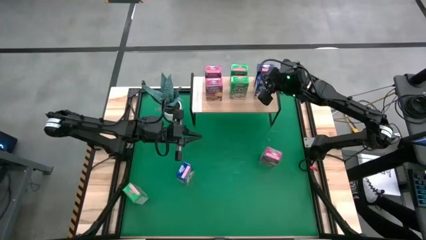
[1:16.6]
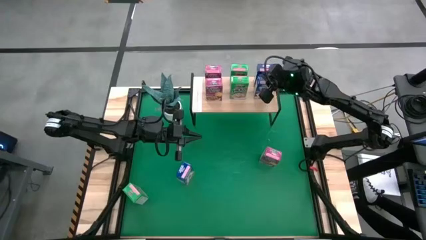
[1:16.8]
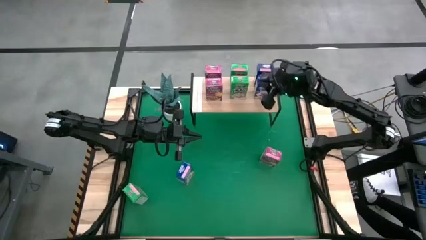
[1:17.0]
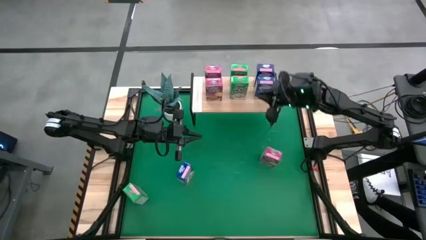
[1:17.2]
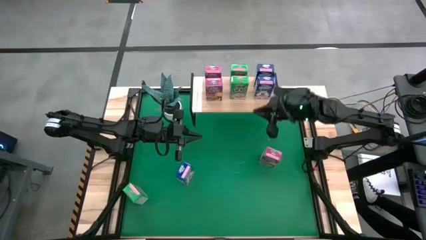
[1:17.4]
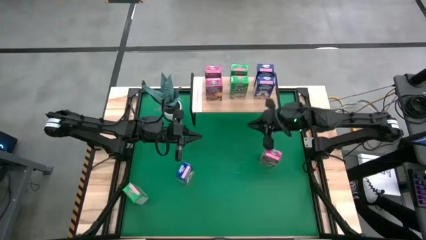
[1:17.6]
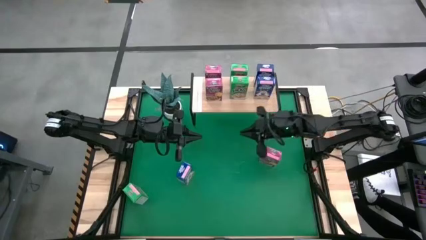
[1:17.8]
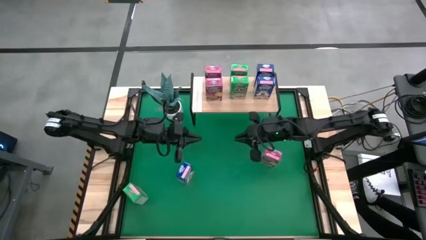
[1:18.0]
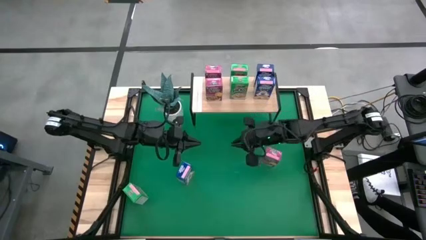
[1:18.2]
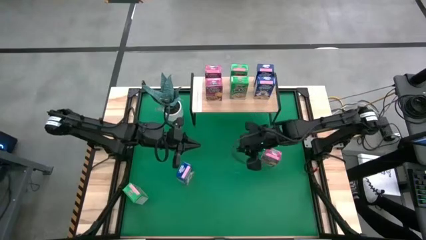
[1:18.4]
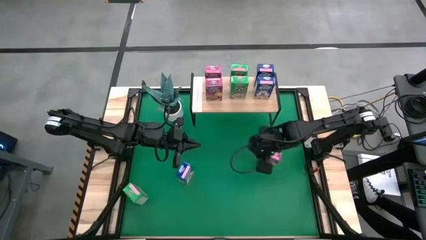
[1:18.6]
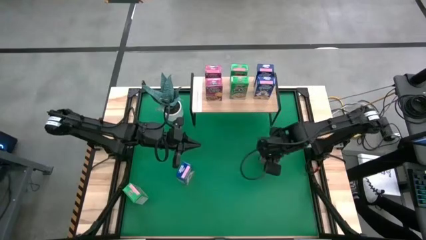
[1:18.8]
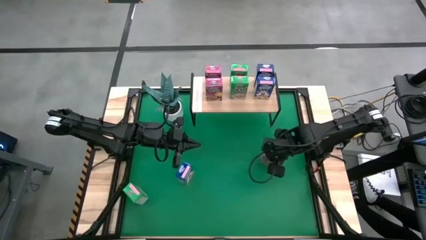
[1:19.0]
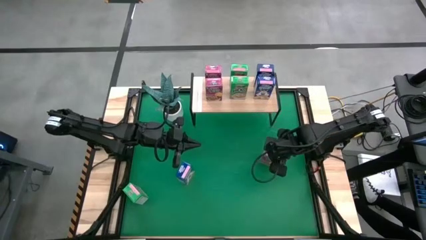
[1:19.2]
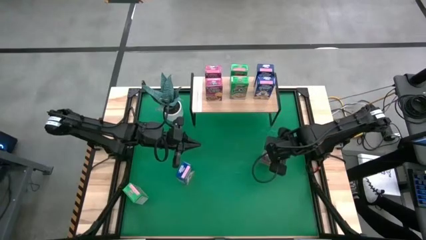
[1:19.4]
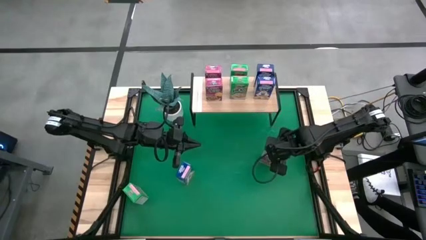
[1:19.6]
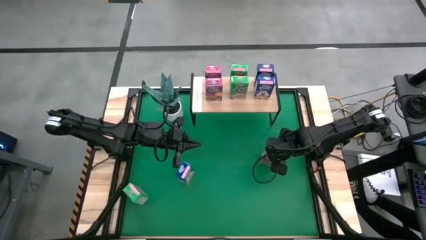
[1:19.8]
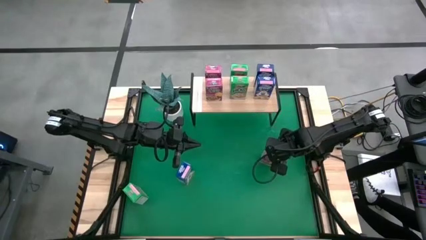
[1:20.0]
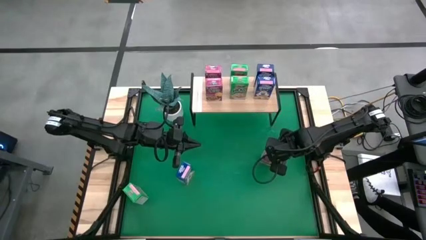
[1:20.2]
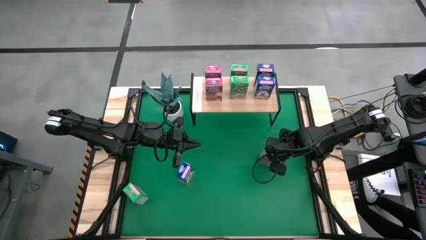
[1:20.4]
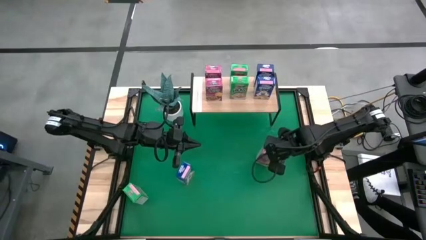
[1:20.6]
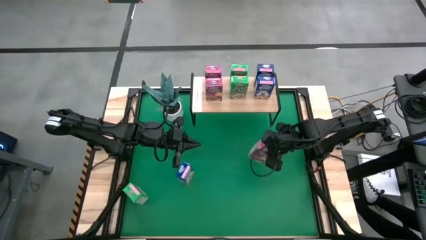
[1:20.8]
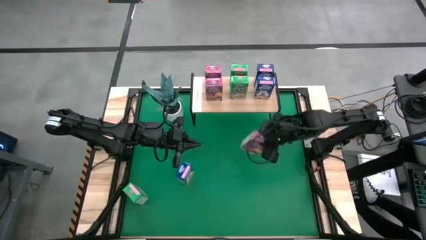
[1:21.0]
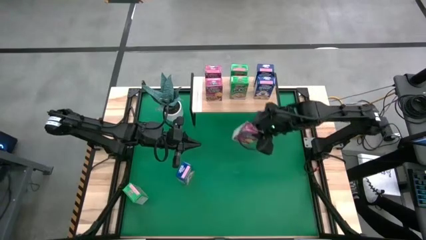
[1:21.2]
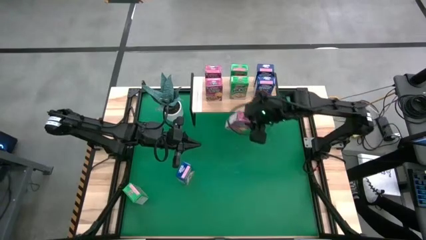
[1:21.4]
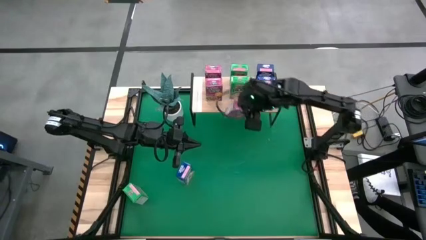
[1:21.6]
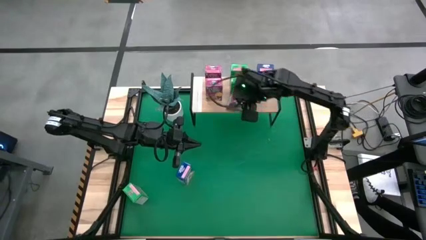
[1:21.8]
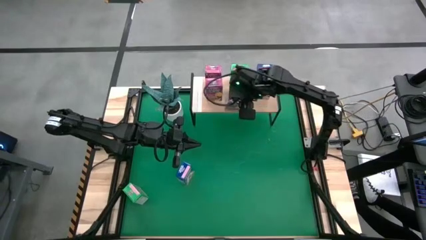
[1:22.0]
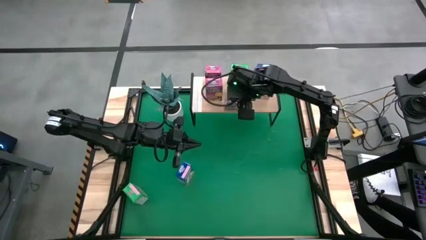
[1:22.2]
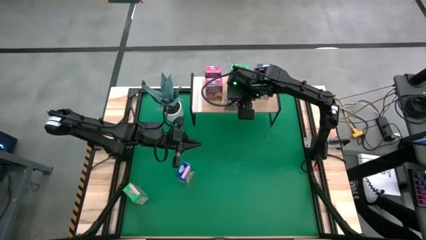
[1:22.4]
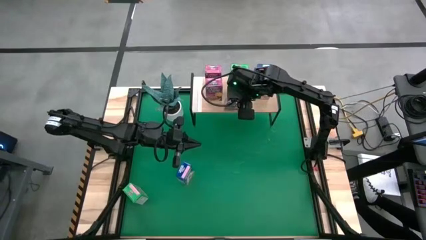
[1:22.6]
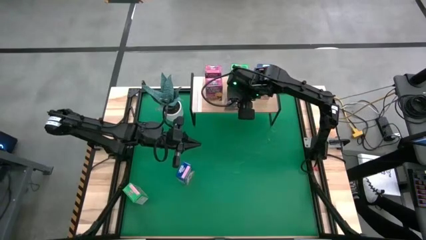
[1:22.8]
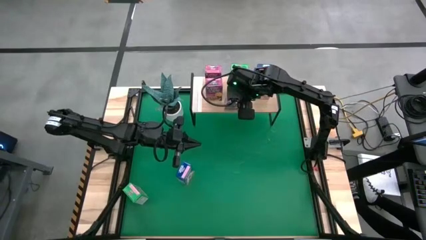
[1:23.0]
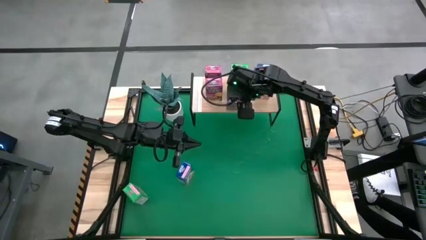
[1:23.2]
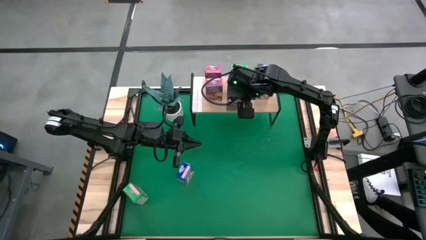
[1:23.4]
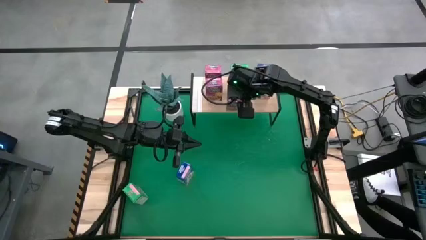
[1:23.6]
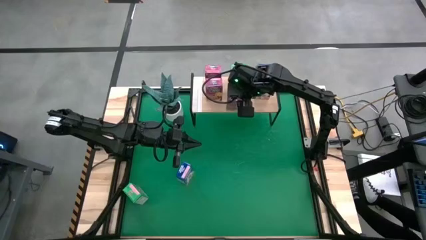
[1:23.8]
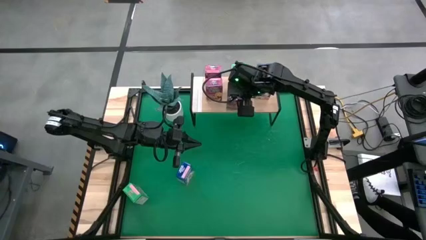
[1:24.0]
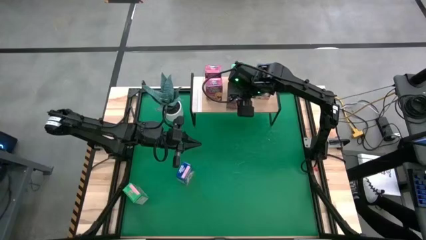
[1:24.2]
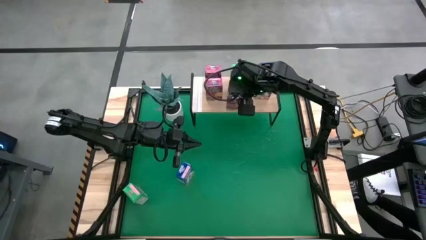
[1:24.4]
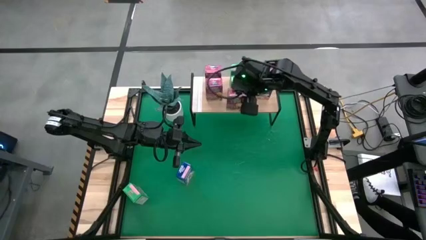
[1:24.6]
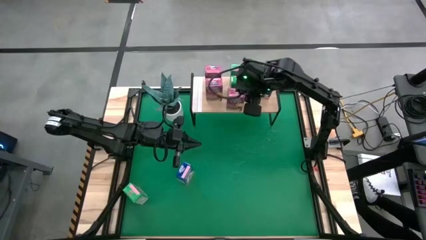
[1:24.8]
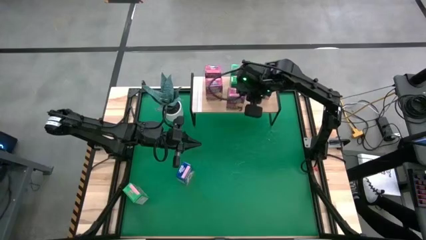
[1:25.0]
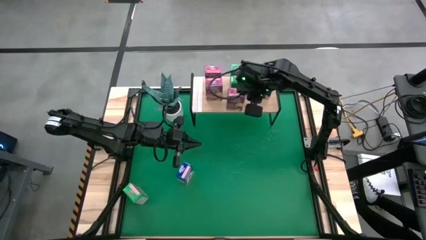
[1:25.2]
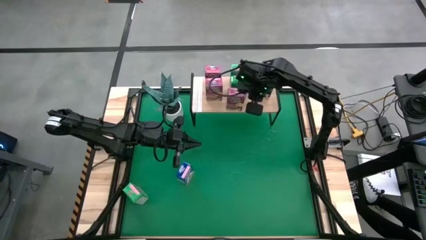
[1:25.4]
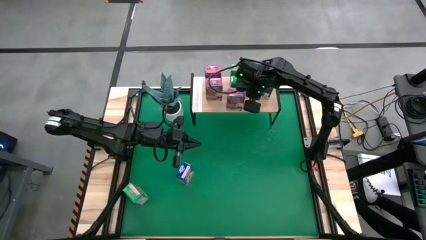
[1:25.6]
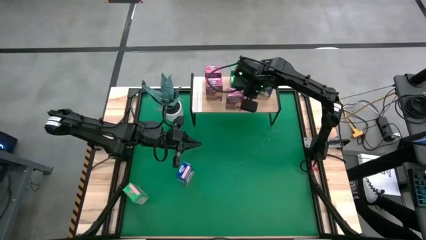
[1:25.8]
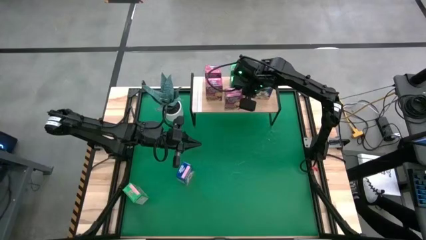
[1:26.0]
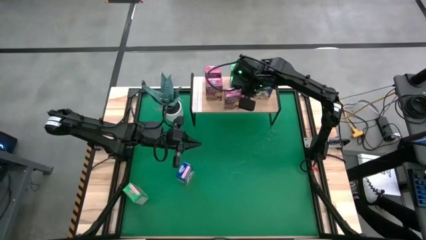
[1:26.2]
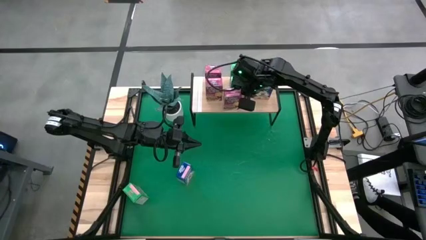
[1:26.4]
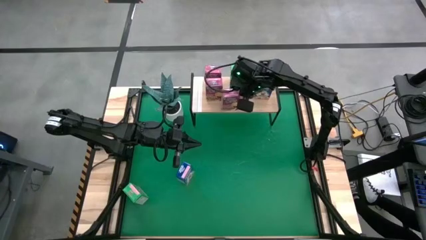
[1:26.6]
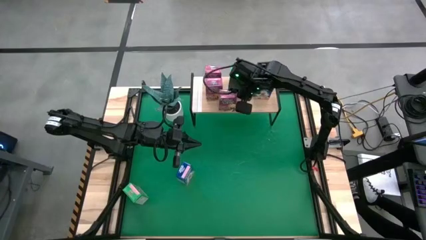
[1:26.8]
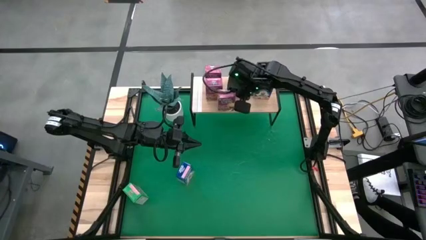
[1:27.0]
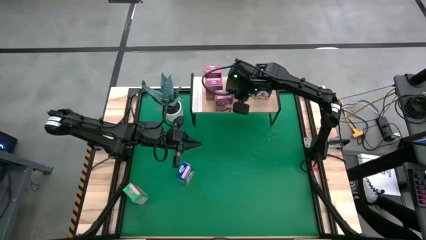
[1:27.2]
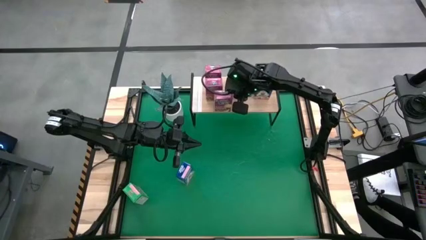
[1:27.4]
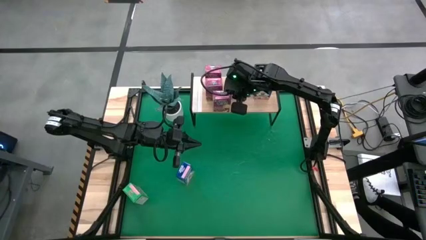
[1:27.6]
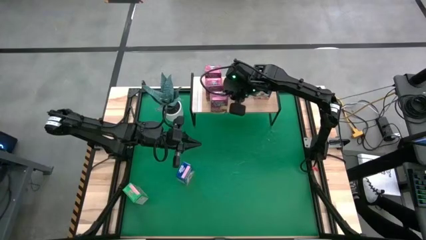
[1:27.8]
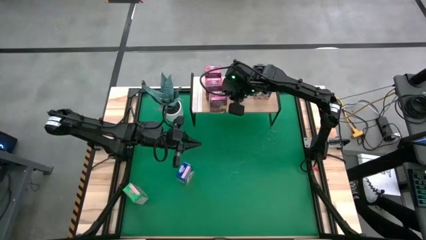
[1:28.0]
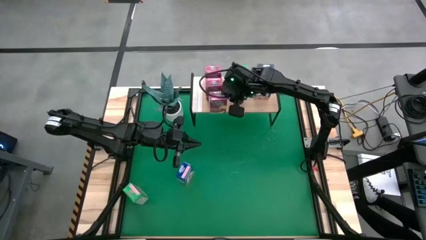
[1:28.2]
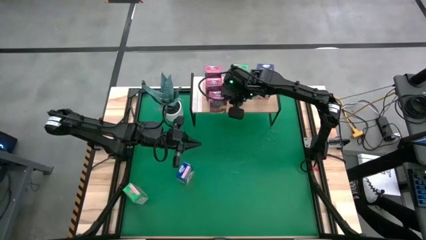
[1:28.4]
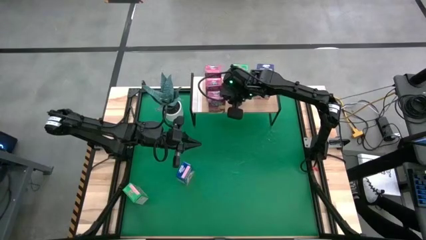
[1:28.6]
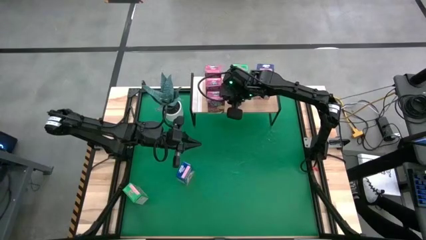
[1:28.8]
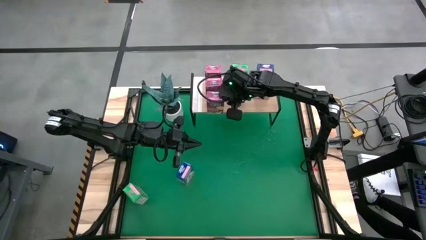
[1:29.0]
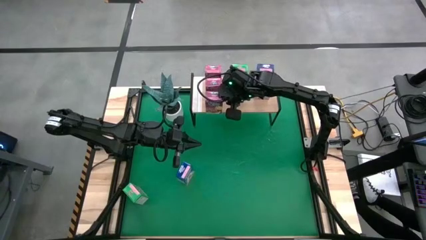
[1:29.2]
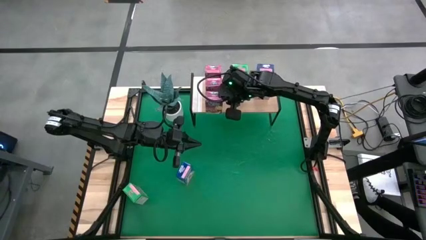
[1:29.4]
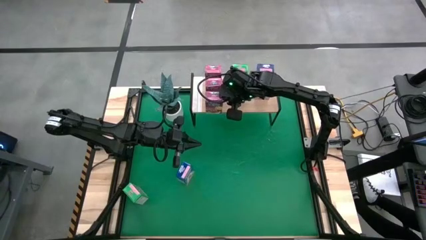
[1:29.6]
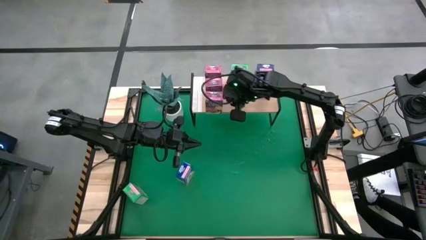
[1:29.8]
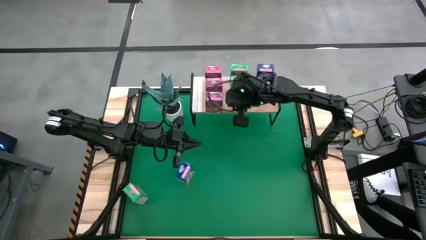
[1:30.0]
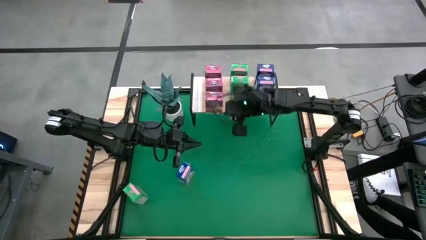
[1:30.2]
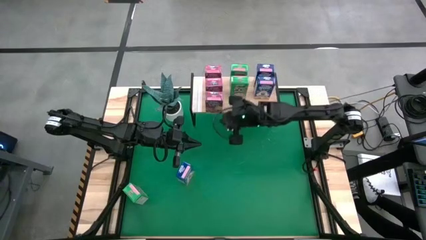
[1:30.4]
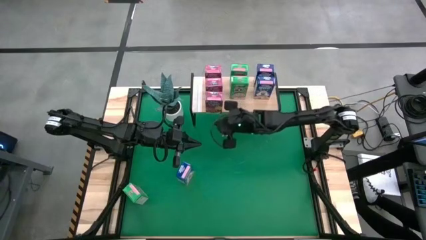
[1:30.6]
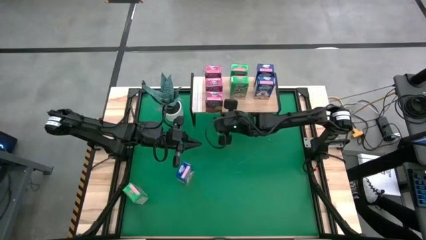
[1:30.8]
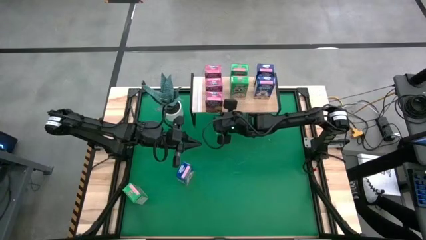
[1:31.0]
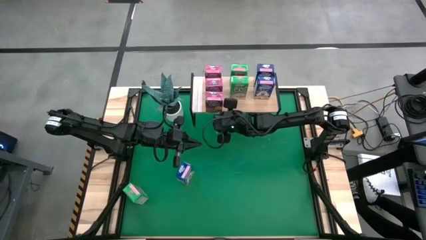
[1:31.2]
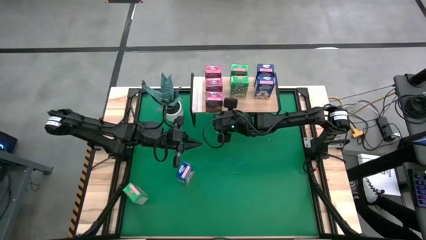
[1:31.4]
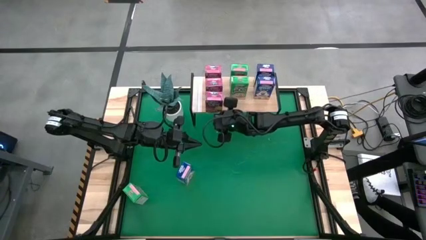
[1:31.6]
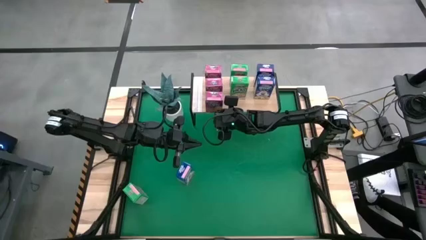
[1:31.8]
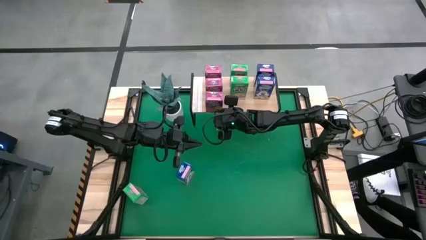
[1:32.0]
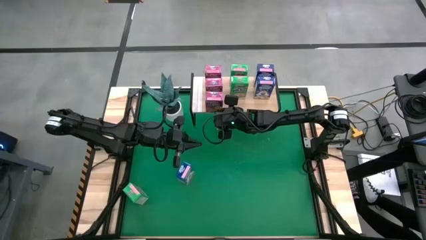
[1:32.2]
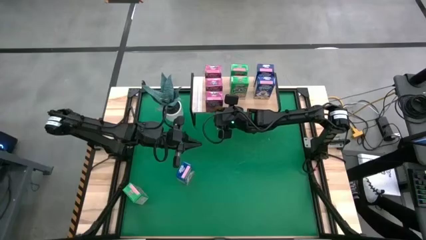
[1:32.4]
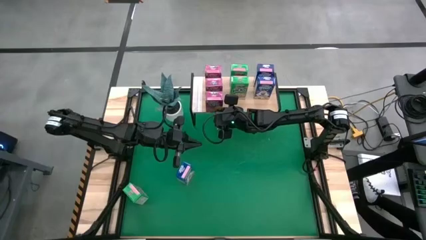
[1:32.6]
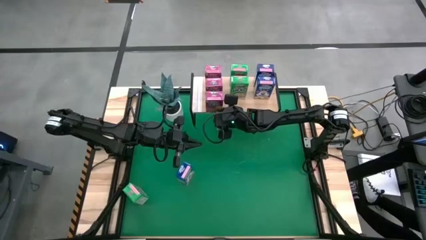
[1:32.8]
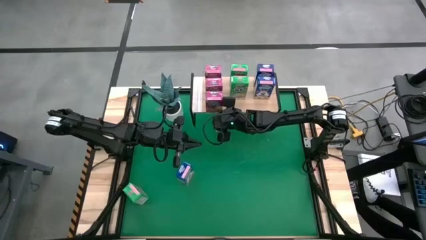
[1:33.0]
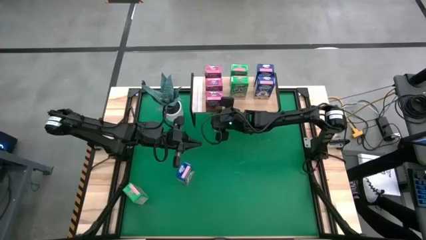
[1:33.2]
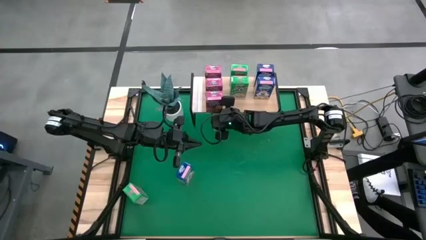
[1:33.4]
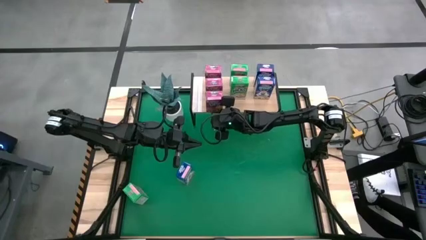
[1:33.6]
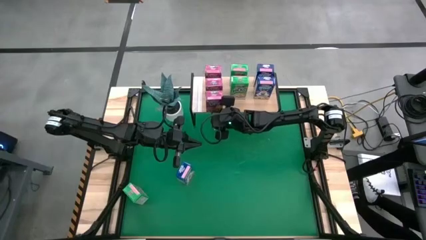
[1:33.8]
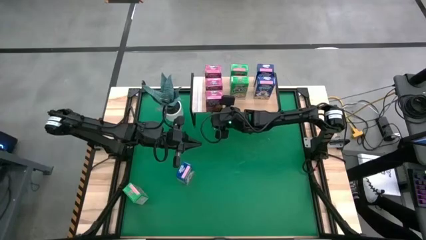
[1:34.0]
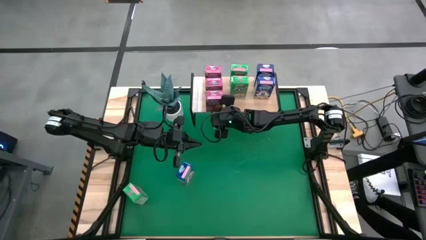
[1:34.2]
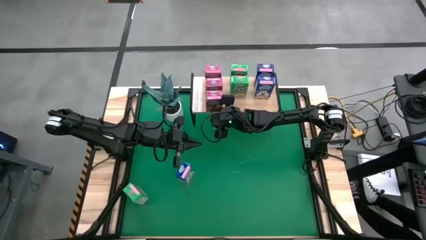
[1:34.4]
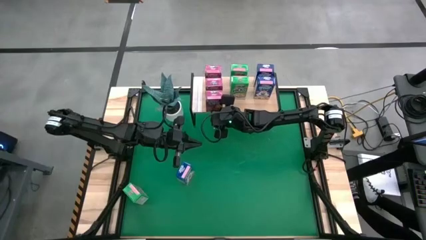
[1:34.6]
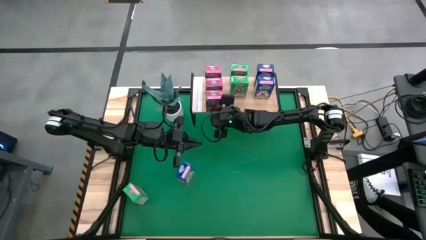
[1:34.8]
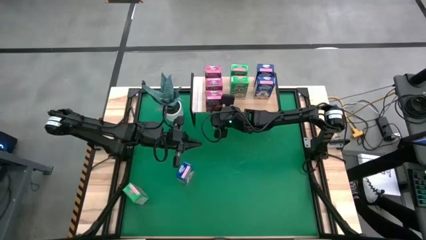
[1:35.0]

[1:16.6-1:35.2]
Task: Stack cereal on shelf
Put the violet cereal box aligned with the other violet cereal boxes on the shelf
